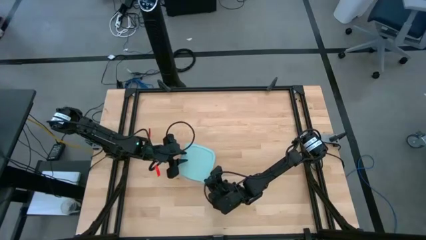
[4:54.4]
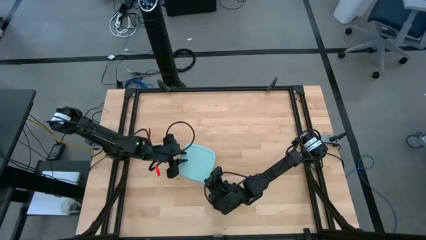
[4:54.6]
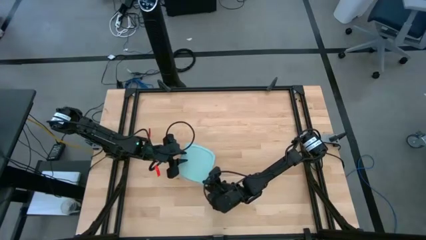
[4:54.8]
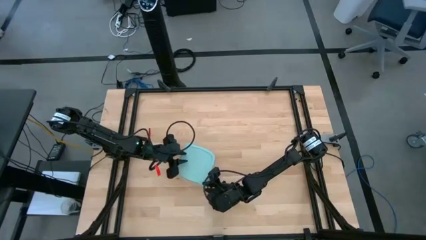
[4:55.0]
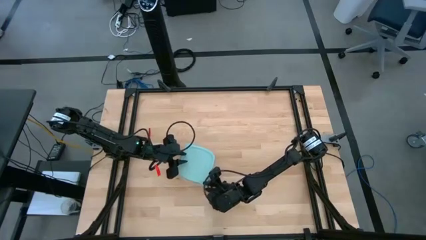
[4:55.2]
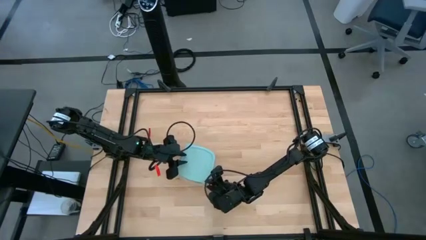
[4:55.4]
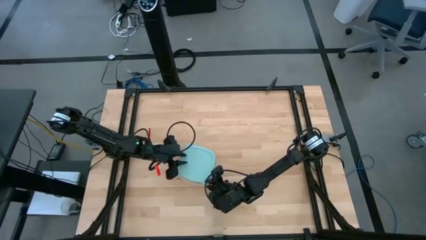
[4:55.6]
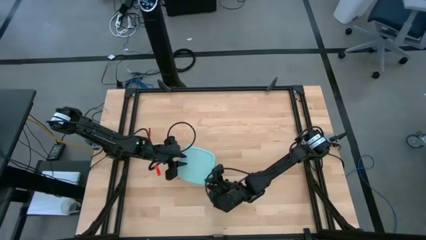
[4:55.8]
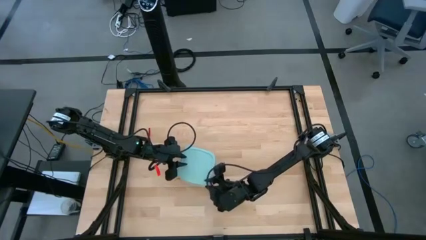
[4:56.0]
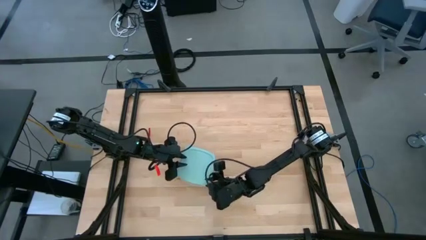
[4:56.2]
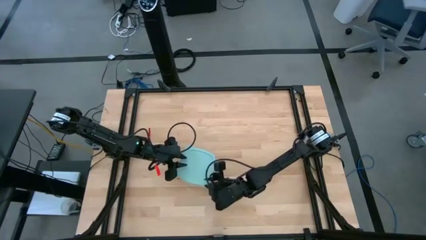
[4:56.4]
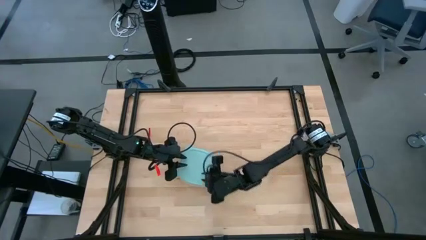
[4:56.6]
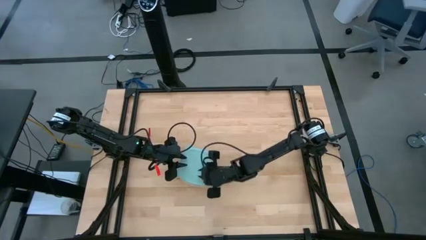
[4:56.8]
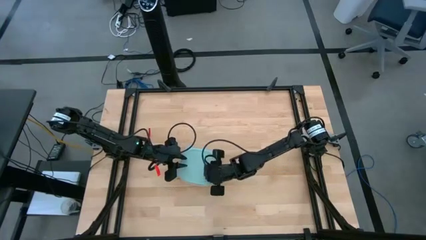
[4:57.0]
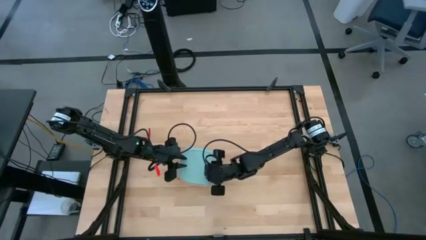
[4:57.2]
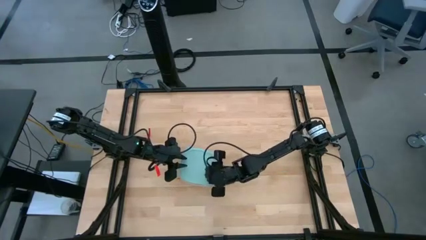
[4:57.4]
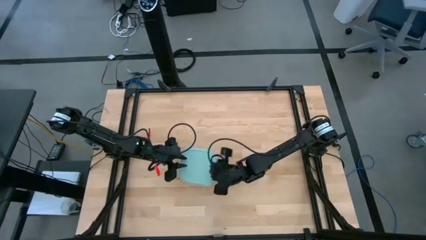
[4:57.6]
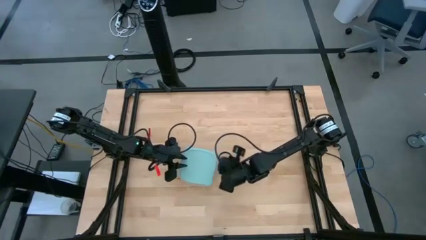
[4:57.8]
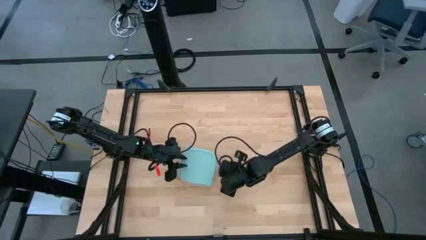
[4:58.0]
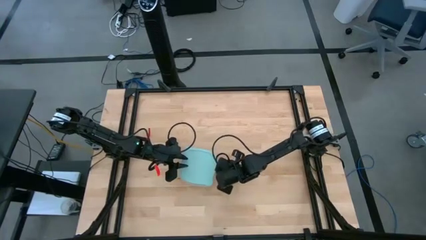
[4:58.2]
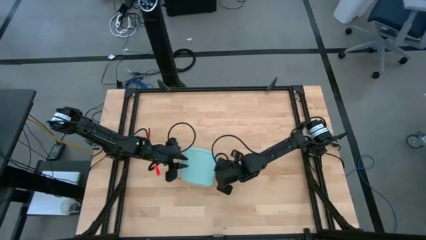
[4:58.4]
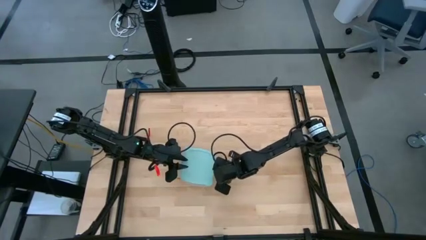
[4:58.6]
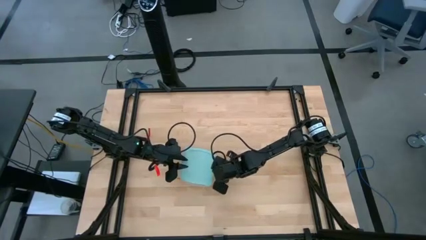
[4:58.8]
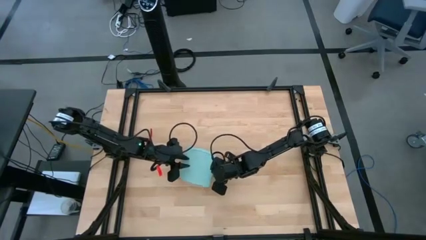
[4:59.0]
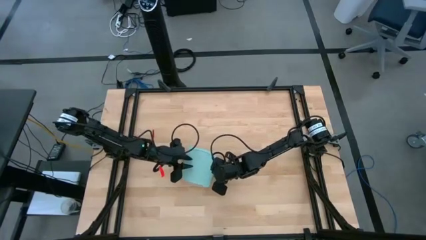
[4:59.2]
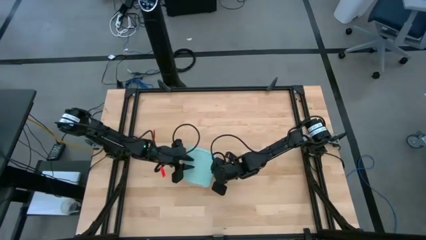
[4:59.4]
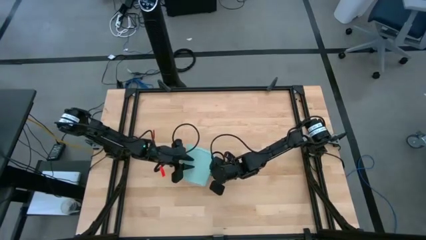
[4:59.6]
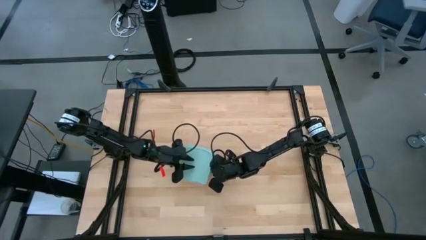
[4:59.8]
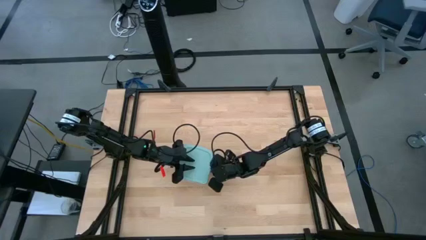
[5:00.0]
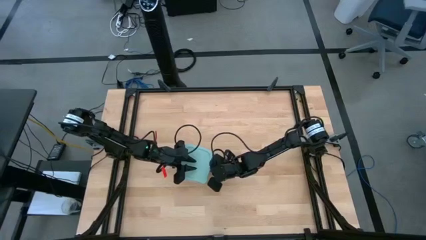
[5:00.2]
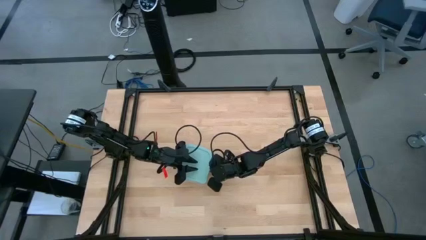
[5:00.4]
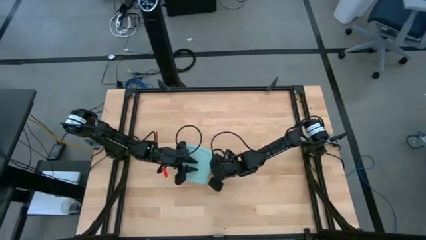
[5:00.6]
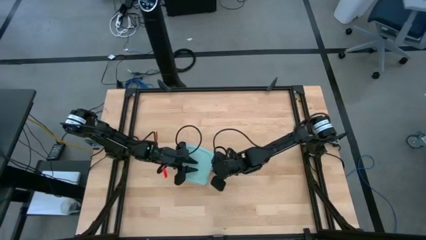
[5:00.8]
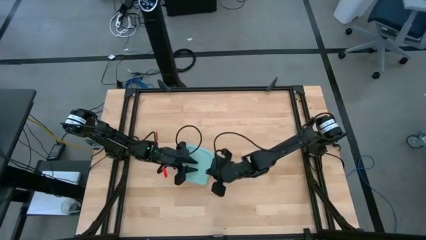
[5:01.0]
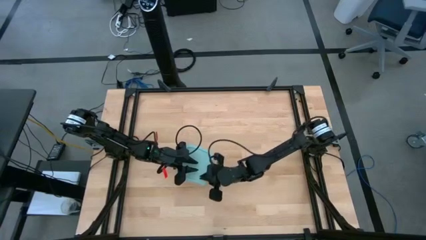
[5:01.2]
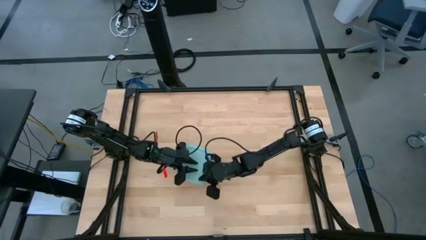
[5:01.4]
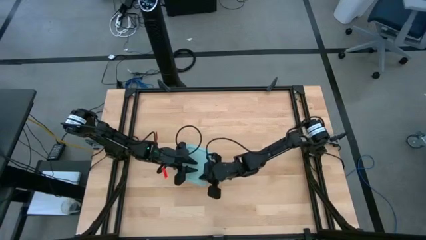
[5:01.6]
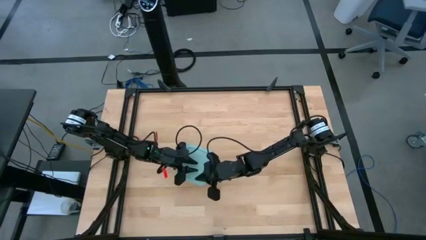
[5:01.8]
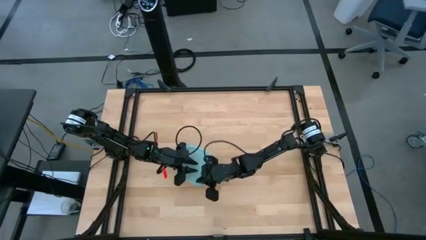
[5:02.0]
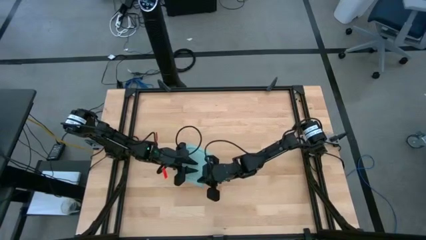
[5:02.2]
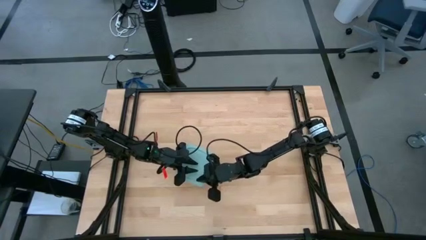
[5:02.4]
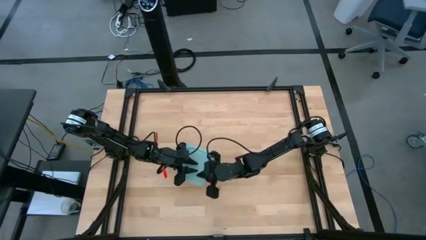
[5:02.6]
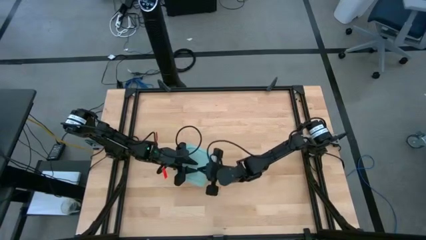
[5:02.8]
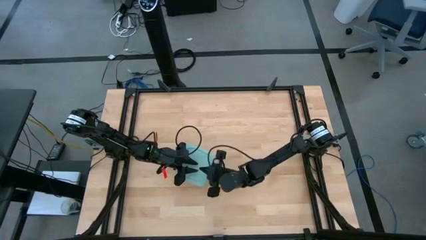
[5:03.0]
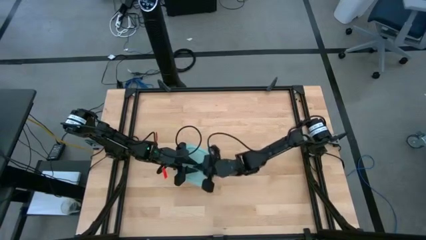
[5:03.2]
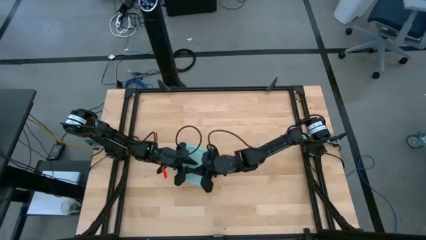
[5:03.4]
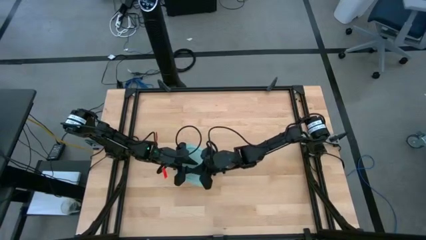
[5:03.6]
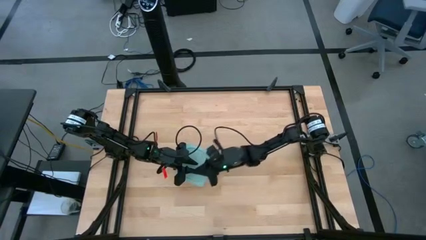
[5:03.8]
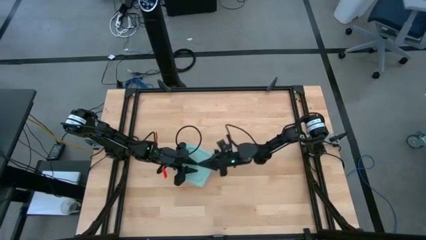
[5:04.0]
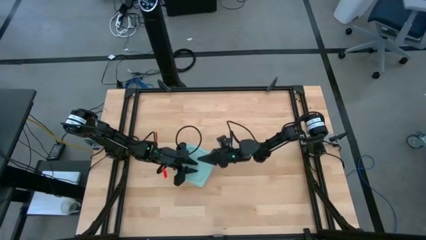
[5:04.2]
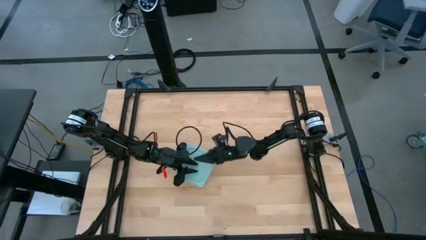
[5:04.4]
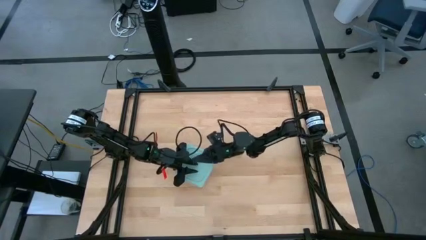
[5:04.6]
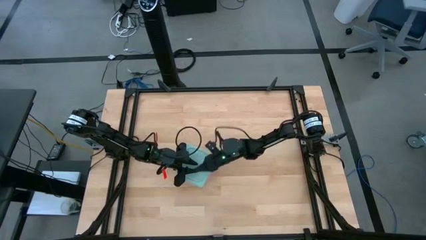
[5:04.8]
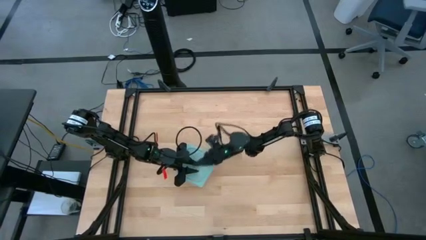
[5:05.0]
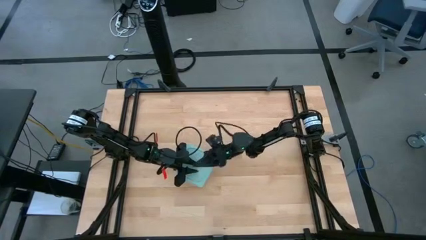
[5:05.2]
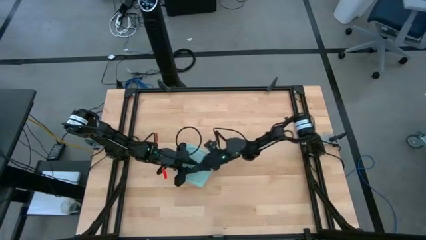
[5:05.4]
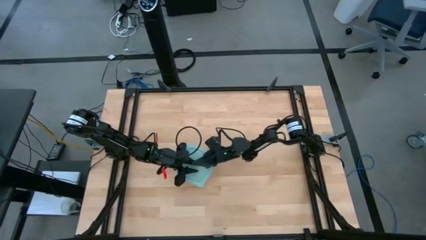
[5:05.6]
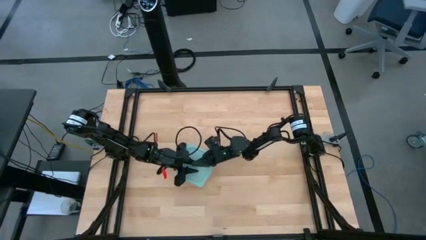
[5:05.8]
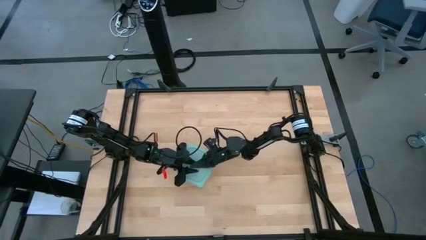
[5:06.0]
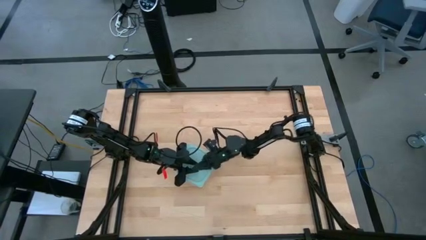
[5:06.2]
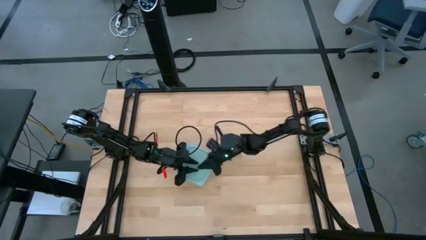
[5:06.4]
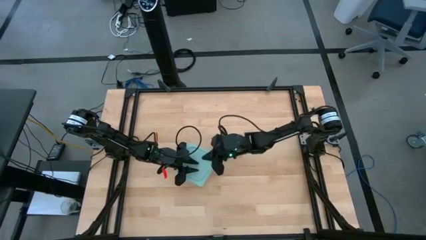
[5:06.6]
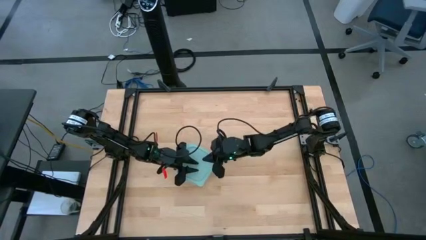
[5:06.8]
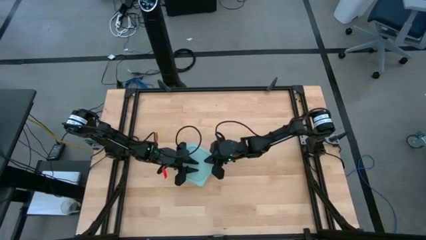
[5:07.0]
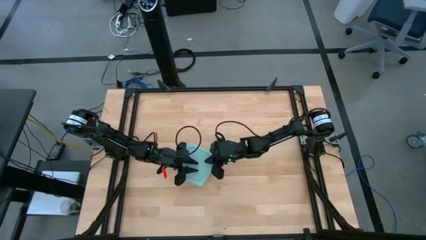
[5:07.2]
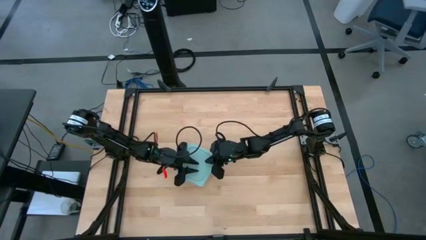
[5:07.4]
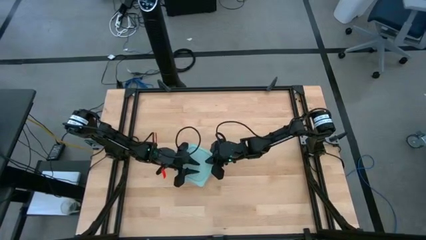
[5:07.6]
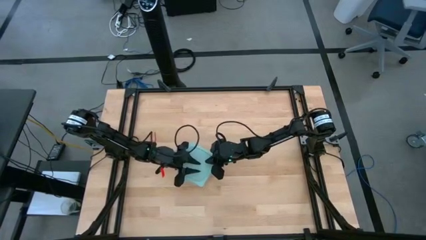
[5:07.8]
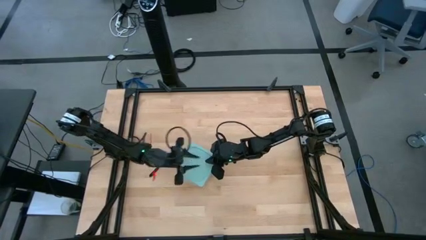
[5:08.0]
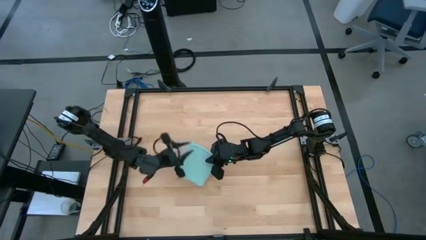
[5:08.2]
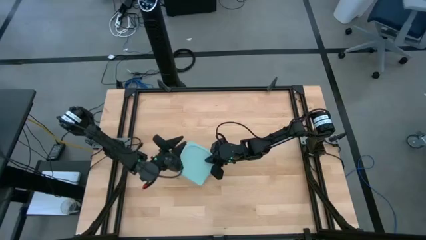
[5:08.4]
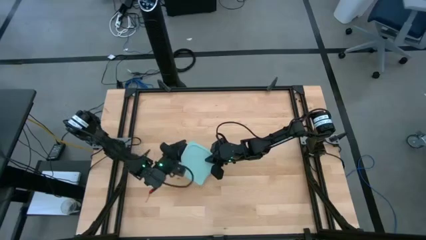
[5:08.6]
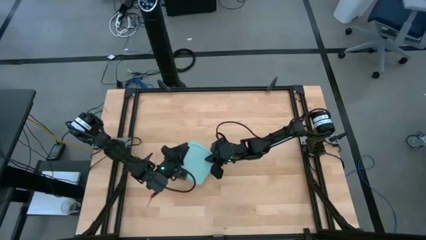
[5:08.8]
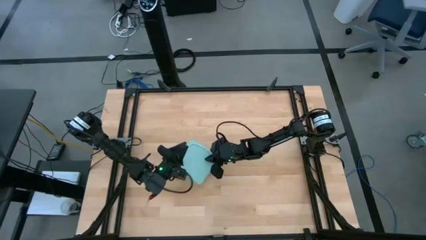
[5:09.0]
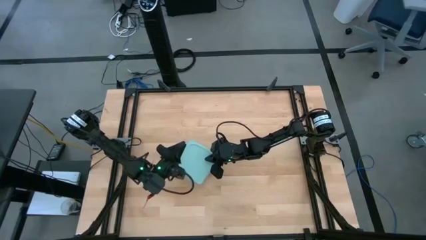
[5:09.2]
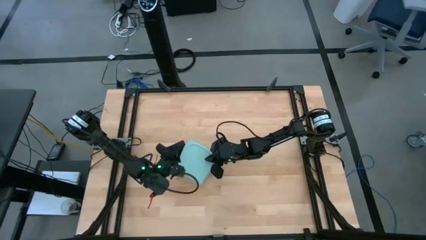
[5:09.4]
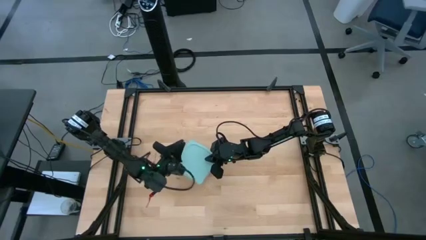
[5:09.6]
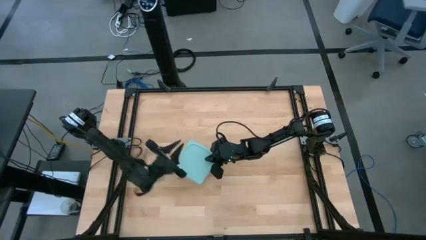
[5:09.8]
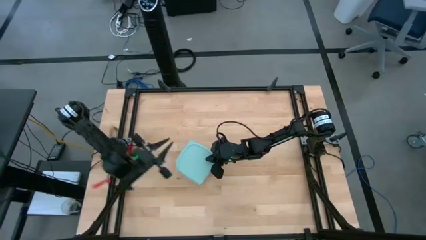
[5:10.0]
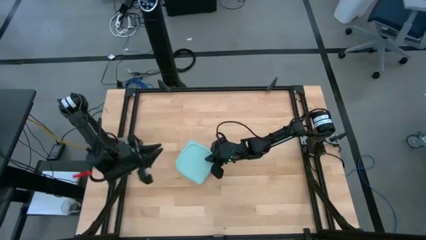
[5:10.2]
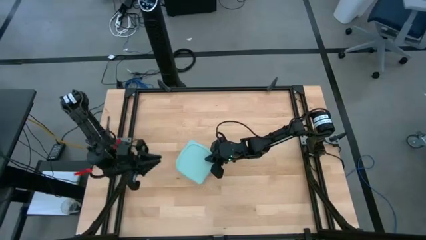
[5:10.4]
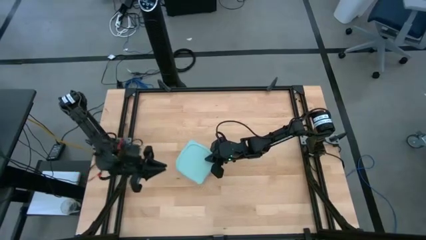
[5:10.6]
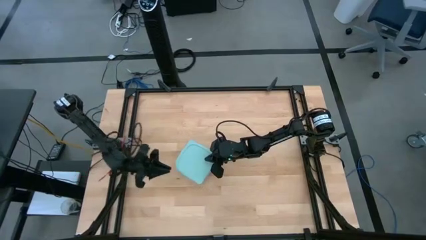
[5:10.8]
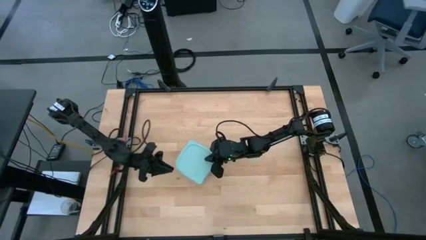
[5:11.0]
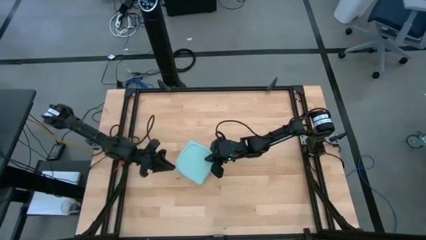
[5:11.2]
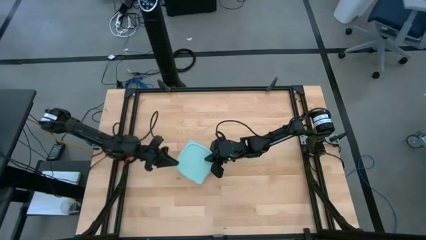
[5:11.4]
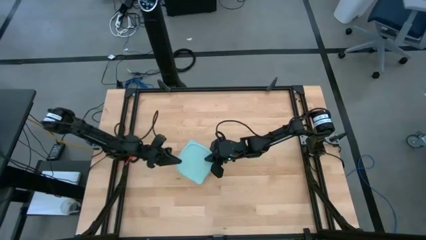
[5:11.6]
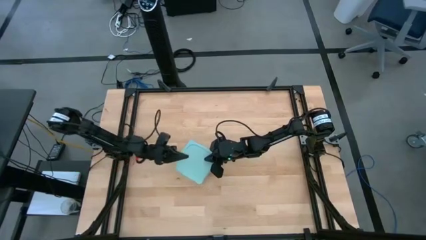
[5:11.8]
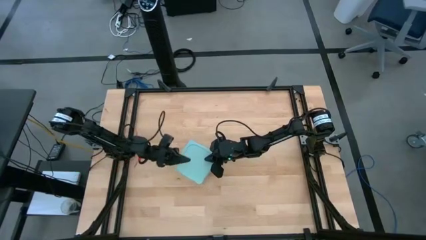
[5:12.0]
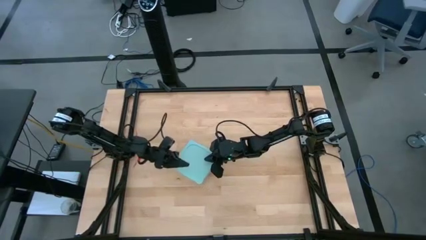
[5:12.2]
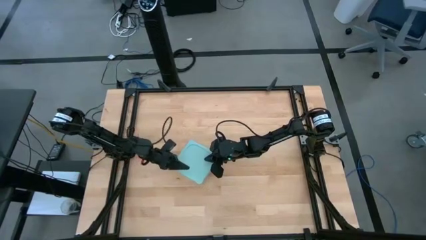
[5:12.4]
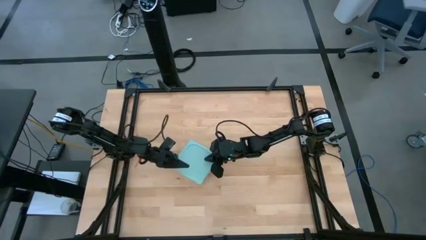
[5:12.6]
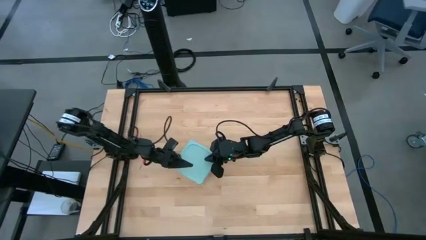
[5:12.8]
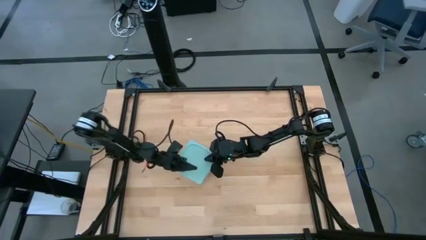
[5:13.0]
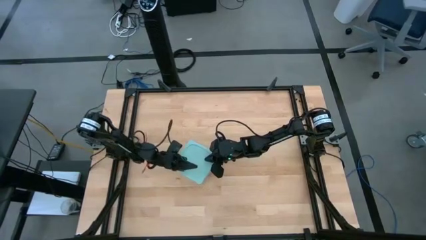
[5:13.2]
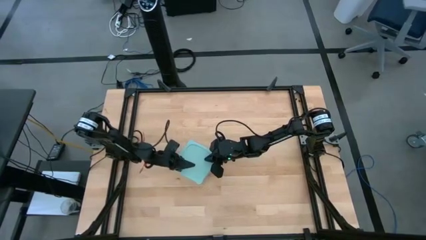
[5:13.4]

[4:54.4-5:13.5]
Task: Roll bandage
Close the transparent tupperware
